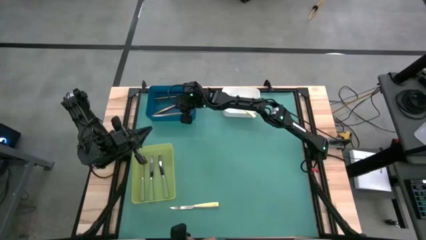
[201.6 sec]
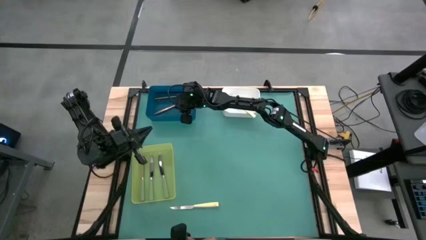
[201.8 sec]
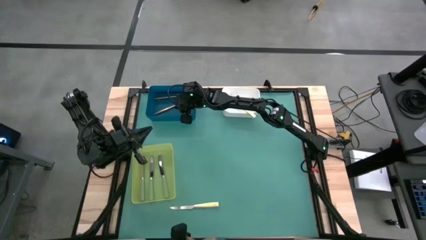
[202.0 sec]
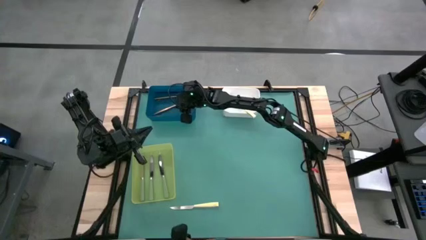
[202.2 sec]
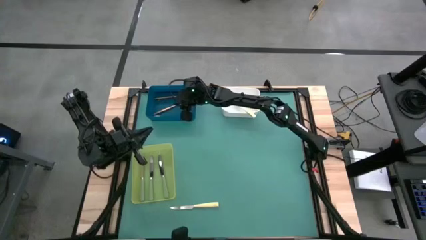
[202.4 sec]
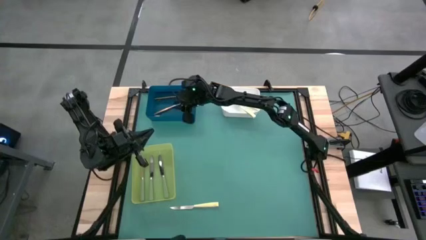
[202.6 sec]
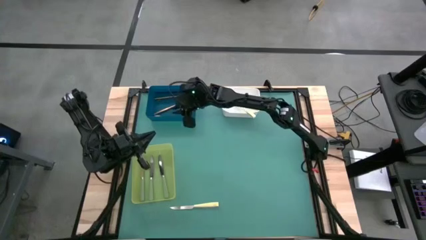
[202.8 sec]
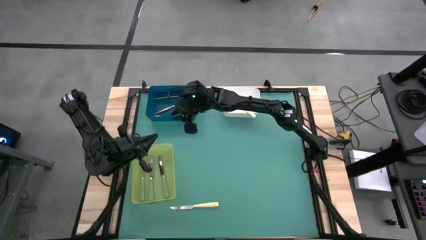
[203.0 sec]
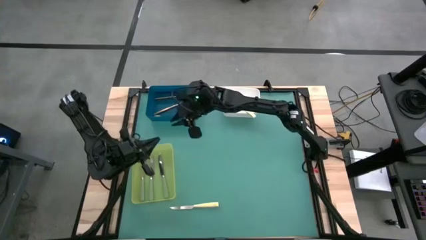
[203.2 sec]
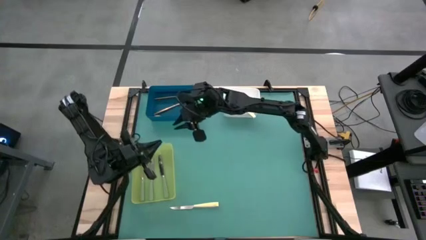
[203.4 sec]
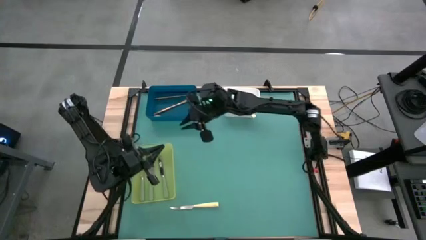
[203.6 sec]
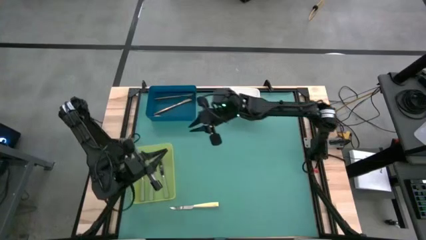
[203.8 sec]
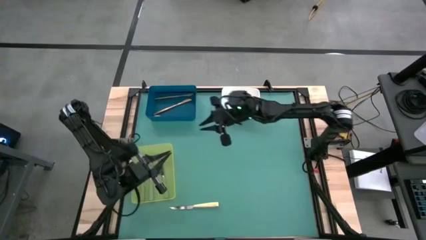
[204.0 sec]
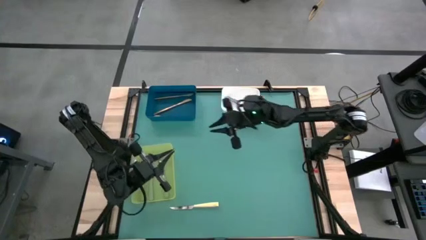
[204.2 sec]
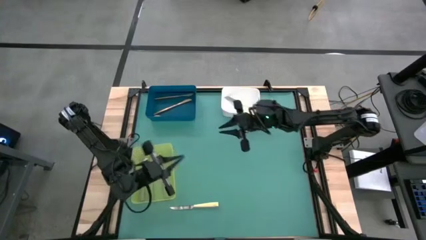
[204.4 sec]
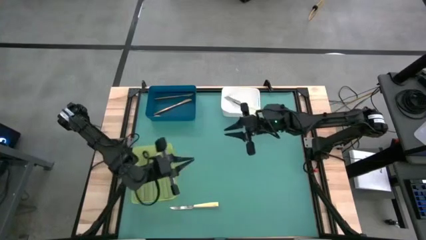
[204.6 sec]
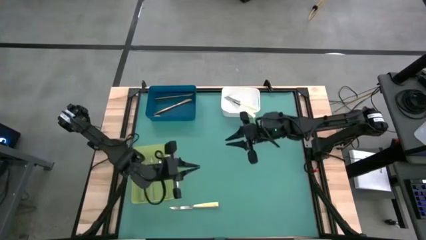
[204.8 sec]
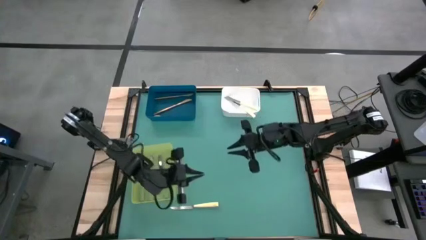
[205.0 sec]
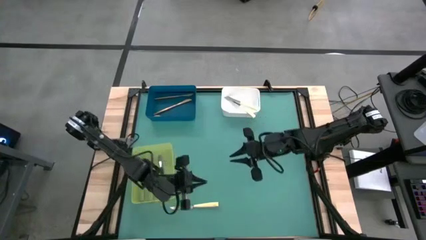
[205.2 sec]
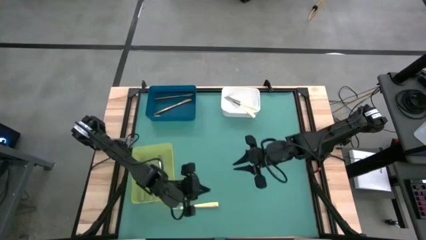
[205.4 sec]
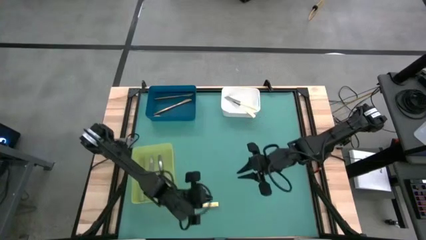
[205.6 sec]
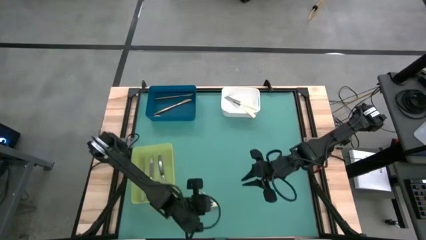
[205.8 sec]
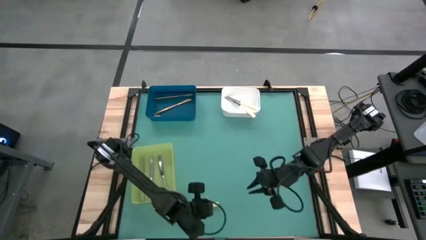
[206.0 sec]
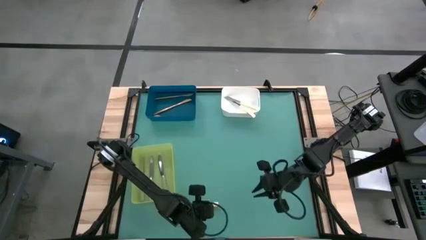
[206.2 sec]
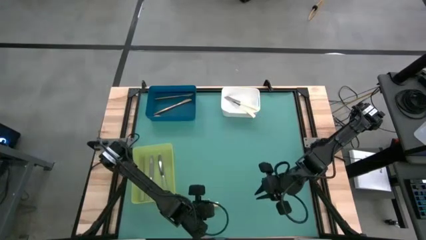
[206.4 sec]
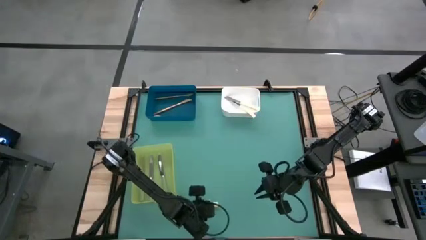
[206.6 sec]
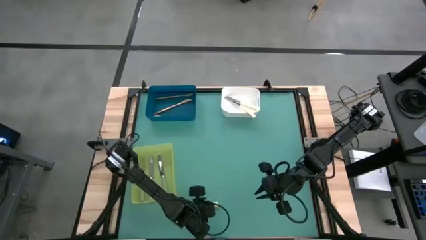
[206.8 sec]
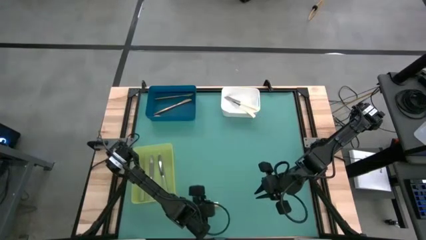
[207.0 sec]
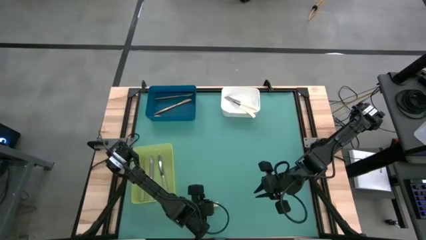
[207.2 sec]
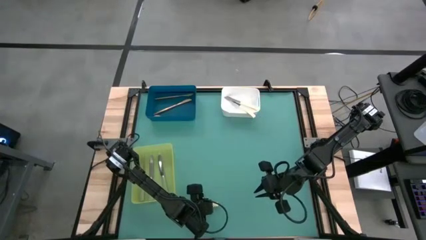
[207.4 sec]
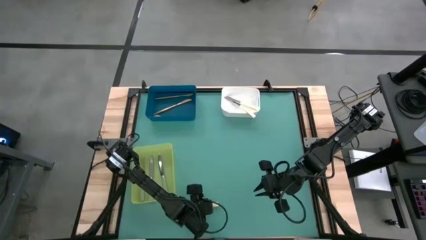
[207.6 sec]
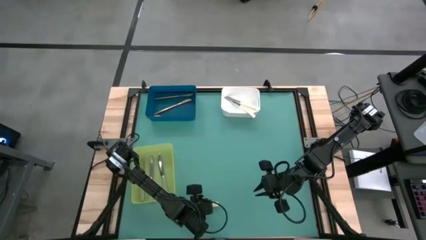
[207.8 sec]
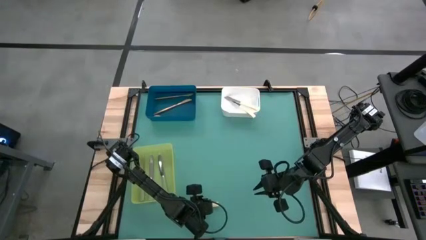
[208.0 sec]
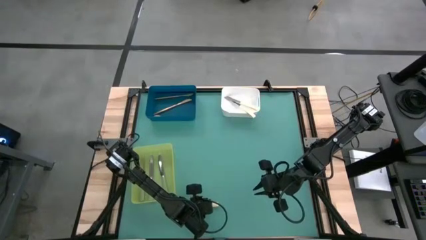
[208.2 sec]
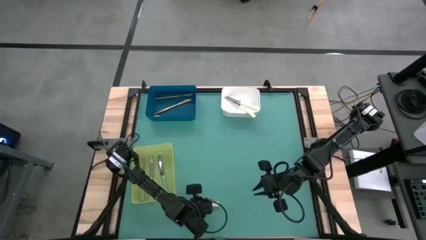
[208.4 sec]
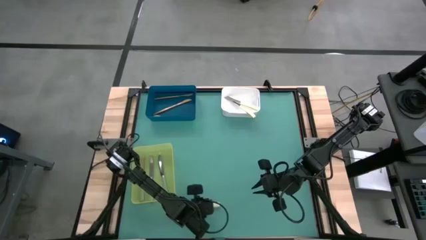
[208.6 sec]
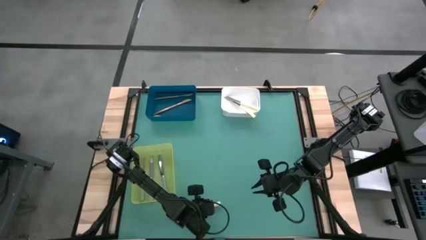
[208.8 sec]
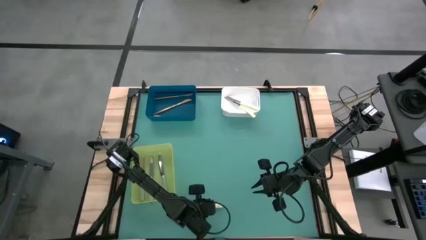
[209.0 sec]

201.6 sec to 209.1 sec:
Task: Sort silverware by color (type)
Put the yellow knife into the white bin

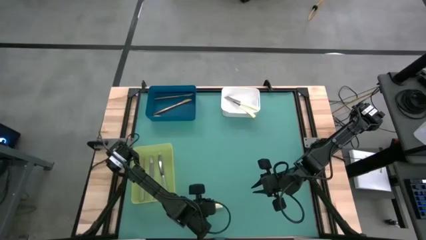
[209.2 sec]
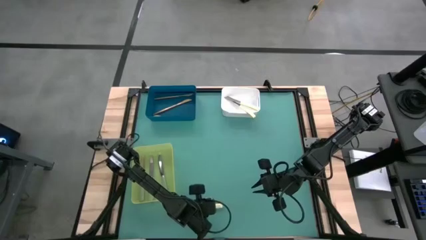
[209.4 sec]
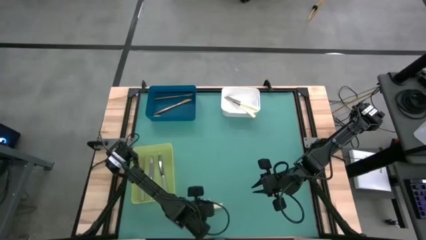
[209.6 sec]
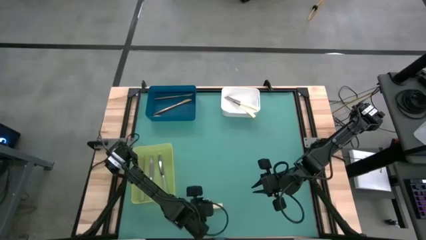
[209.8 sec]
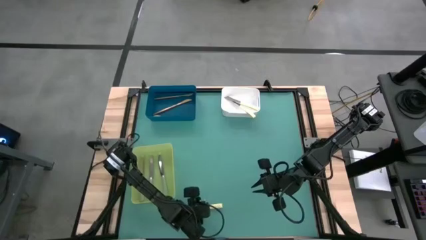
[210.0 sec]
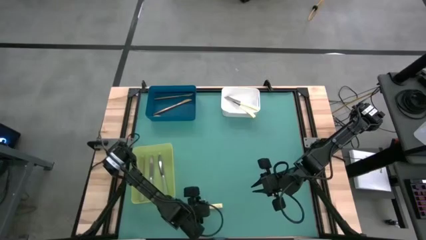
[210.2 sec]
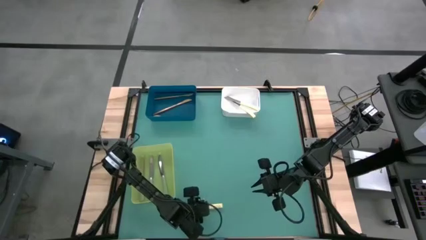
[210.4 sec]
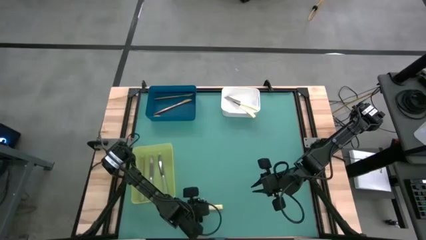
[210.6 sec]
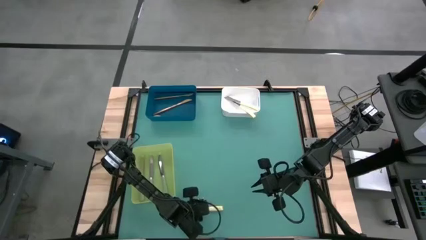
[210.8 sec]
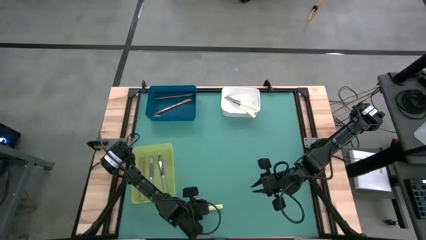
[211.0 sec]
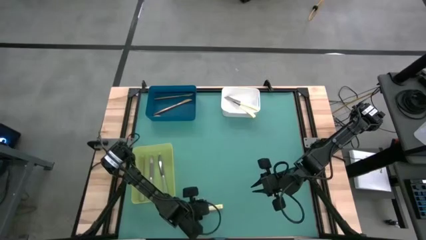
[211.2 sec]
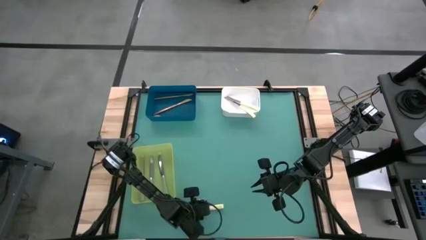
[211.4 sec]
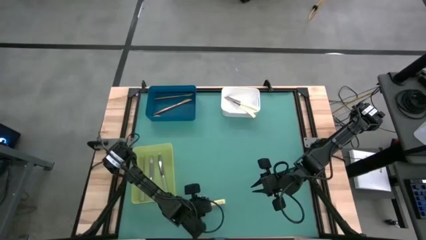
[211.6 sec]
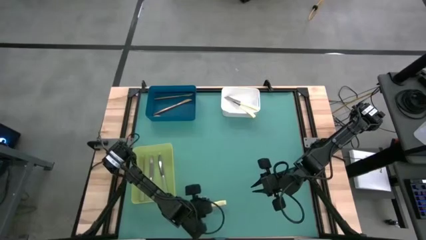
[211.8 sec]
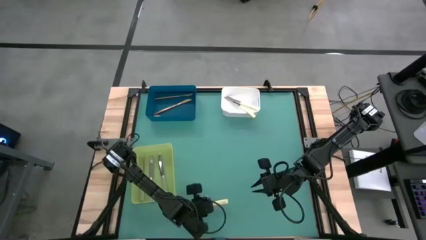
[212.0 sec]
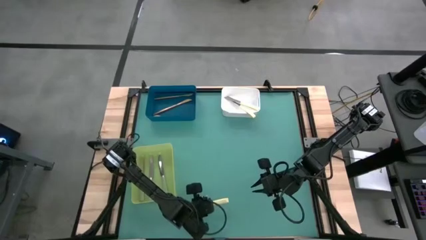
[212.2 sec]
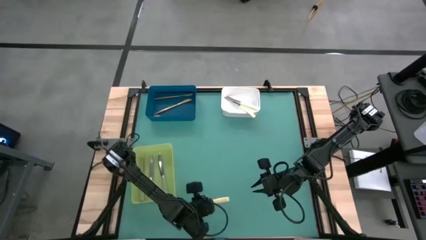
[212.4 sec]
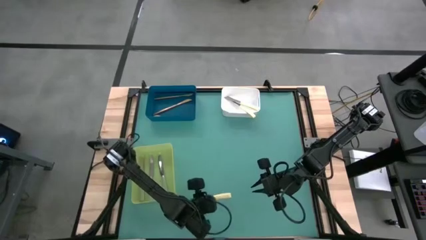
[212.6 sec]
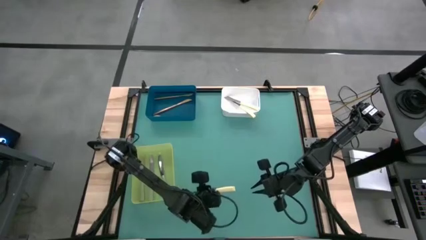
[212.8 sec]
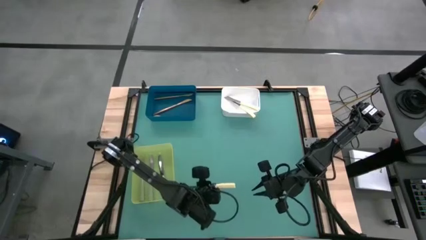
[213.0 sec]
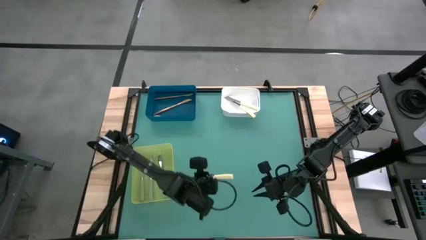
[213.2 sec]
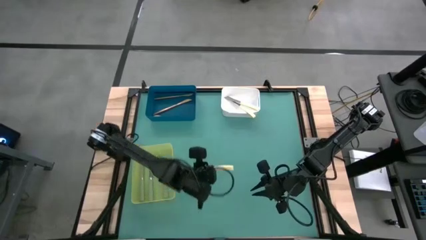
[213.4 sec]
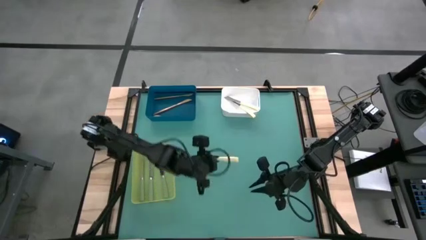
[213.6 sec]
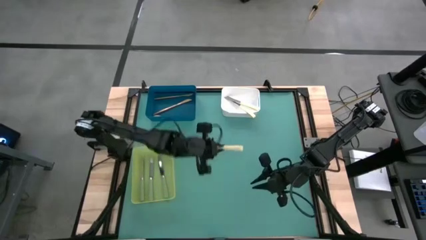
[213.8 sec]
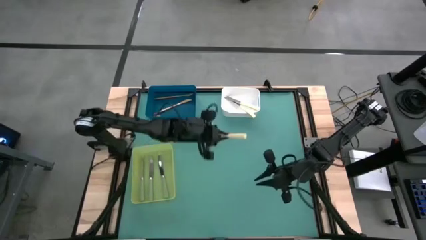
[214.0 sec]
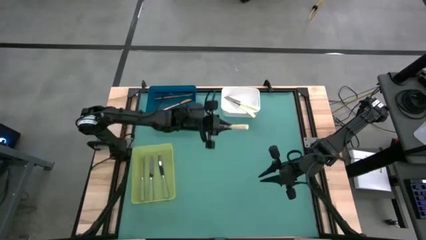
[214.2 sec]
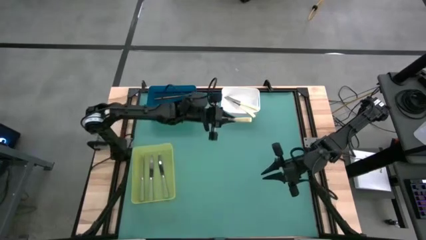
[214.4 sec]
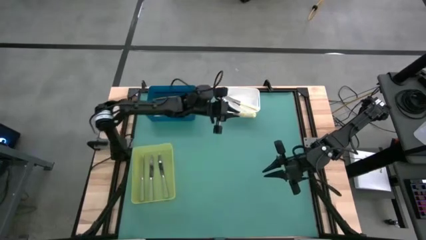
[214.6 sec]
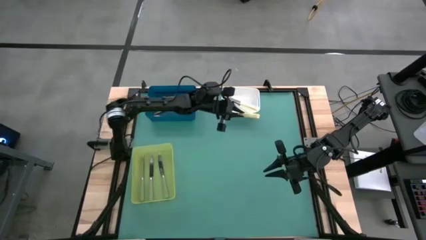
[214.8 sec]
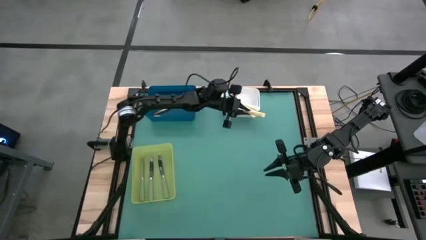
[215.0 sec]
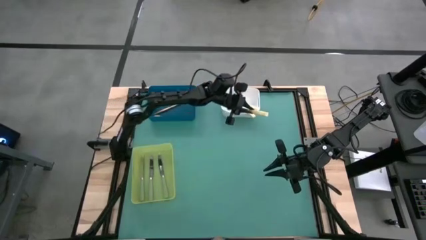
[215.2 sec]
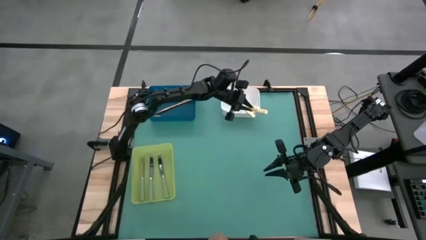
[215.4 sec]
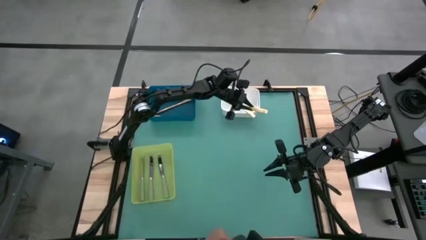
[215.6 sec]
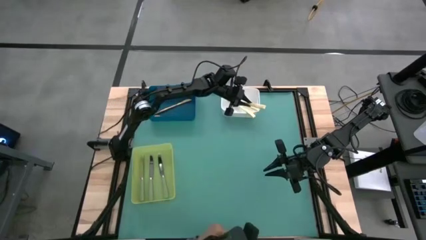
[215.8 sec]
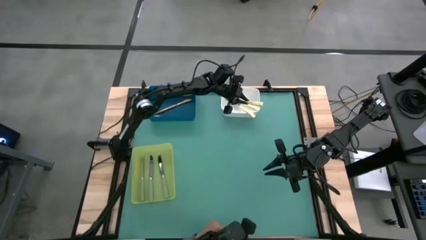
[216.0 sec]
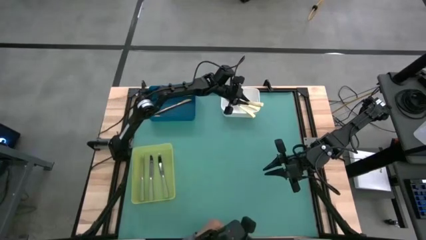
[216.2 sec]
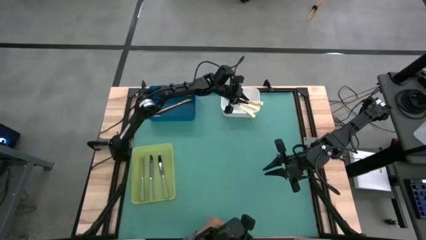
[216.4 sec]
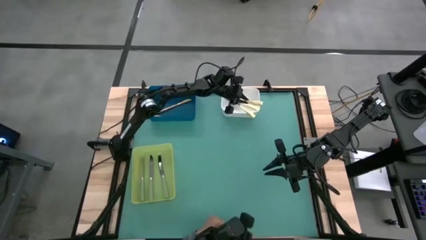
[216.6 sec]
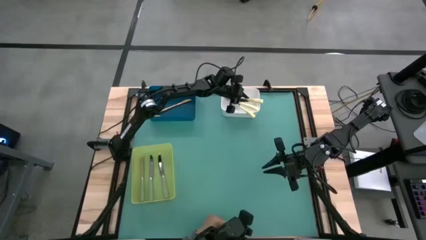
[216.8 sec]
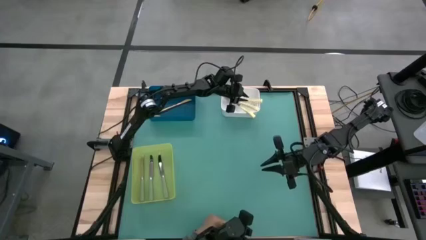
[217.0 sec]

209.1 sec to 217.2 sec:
Put the yellow knife into the white bin

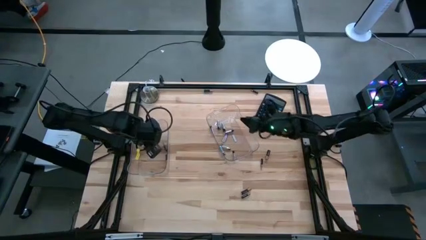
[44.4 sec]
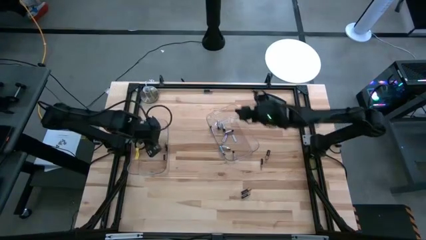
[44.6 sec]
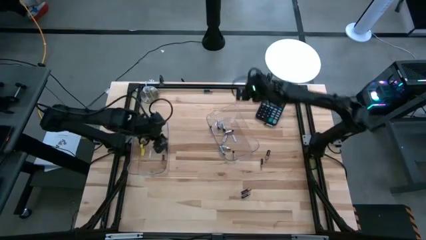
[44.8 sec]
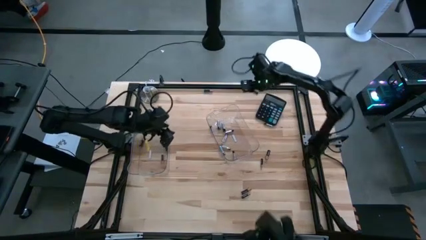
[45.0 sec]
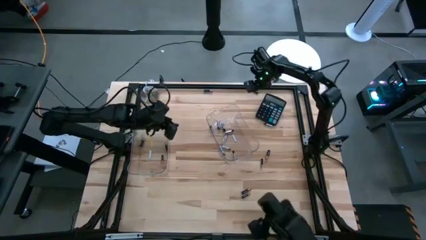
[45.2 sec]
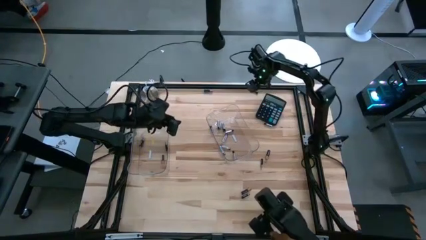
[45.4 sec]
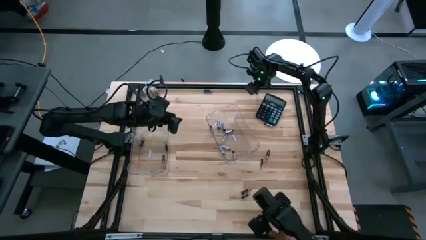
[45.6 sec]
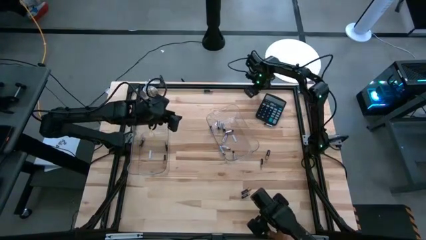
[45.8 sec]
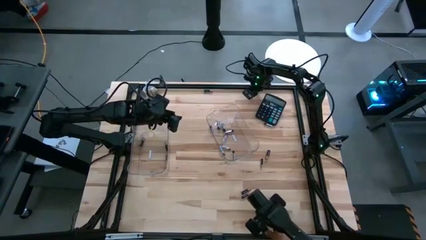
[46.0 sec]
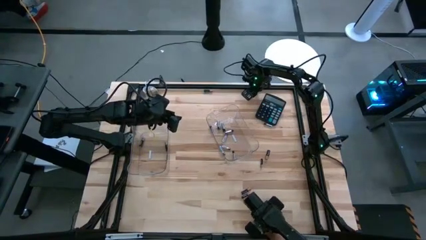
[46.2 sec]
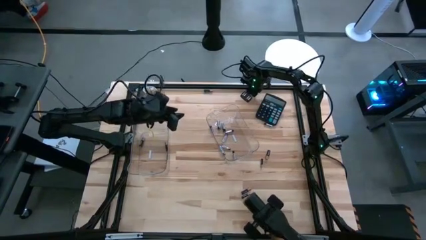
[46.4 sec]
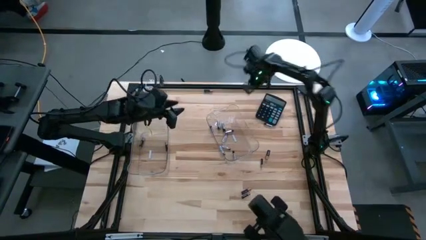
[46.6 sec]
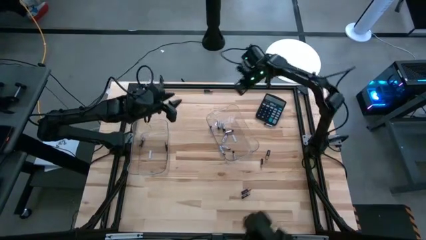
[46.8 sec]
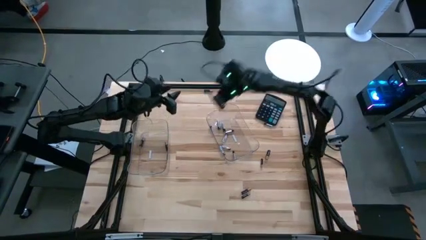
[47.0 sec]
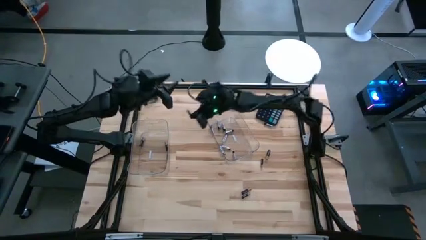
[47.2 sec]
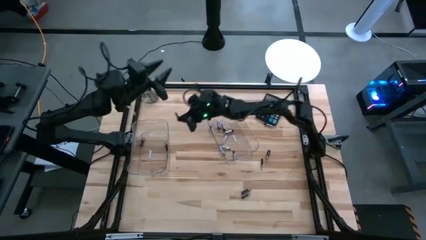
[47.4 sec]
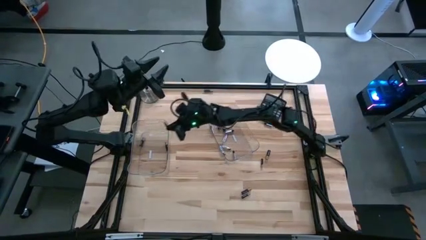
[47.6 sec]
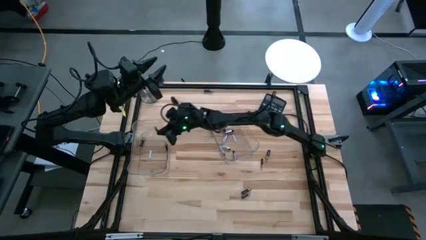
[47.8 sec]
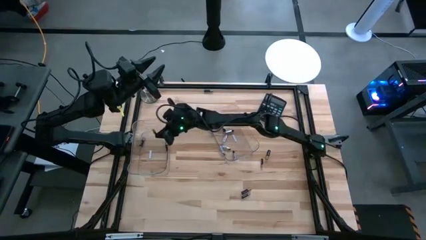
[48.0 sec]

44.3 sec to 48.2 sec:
Task: Sort batteries
Put the black battery into the left transparent bin
